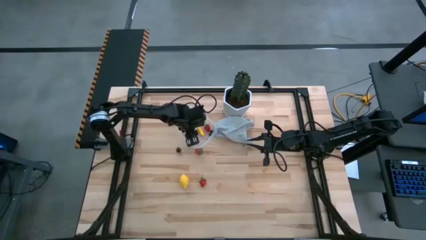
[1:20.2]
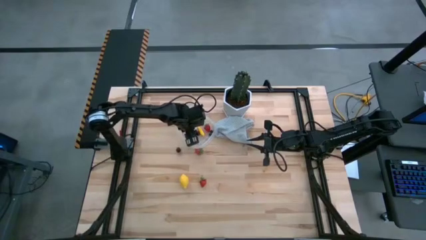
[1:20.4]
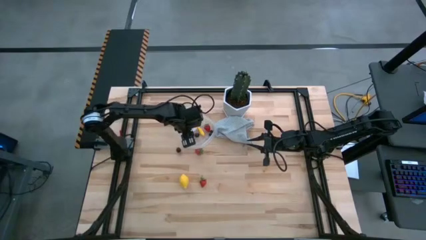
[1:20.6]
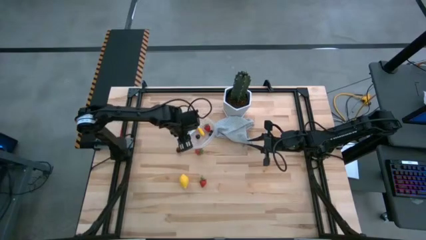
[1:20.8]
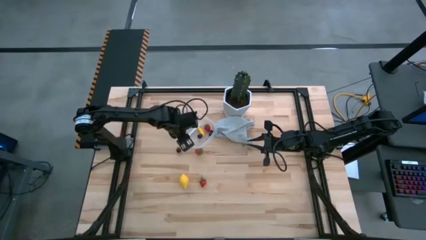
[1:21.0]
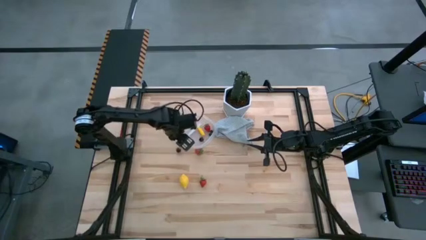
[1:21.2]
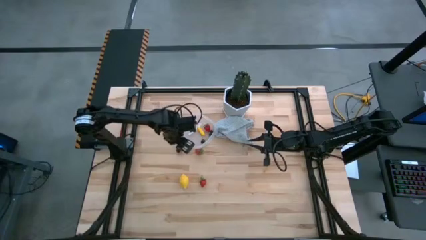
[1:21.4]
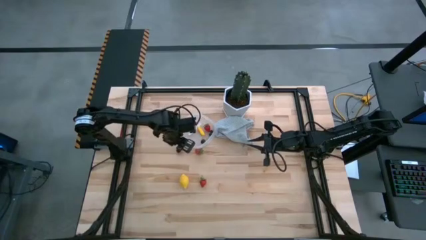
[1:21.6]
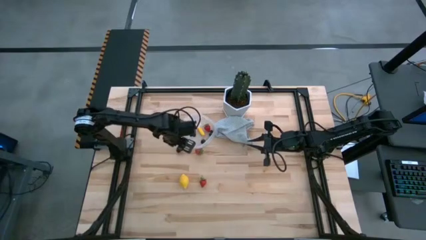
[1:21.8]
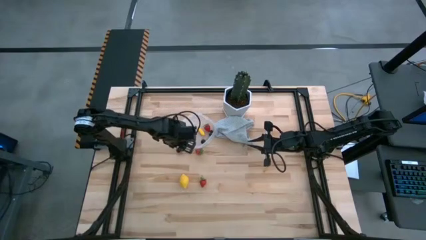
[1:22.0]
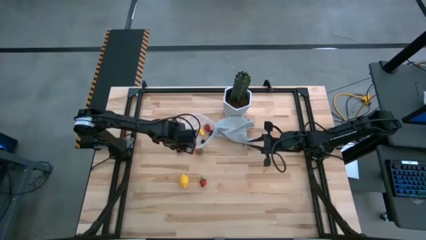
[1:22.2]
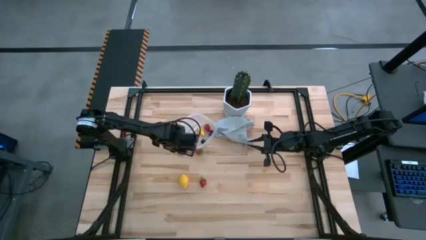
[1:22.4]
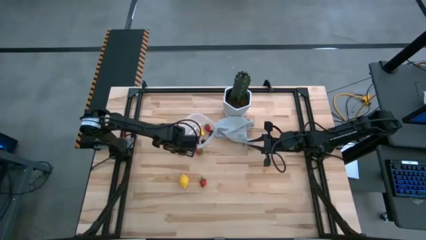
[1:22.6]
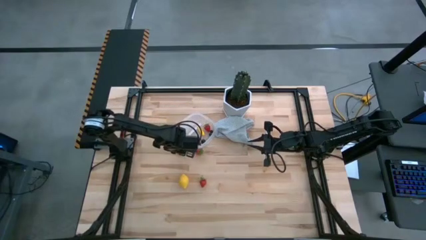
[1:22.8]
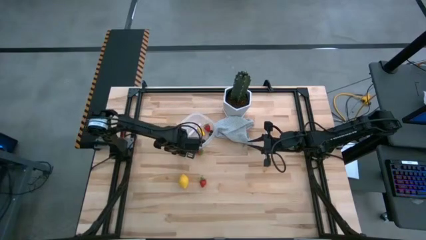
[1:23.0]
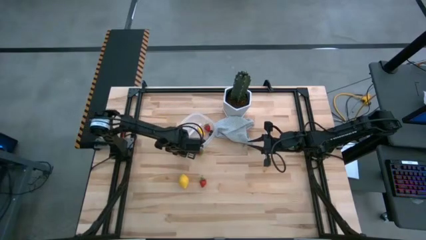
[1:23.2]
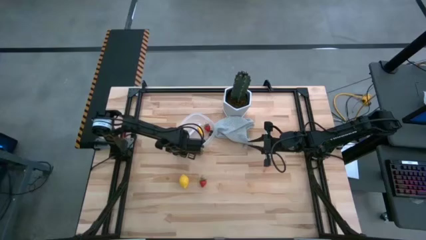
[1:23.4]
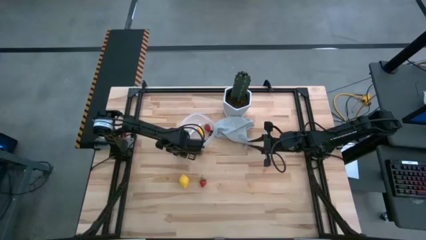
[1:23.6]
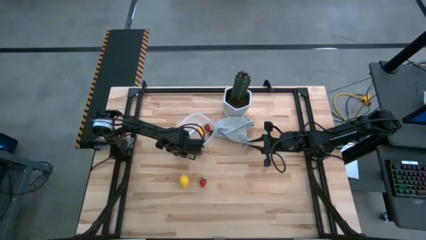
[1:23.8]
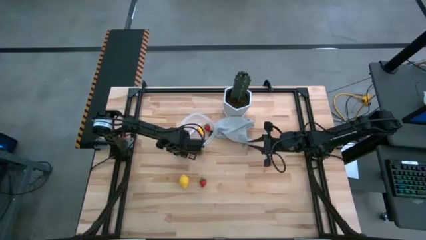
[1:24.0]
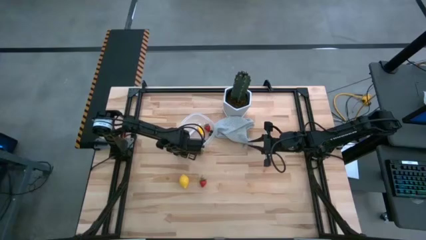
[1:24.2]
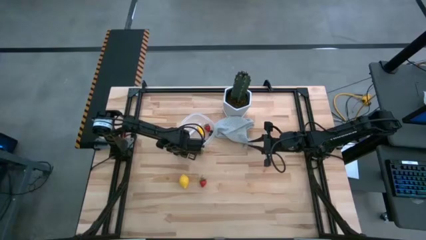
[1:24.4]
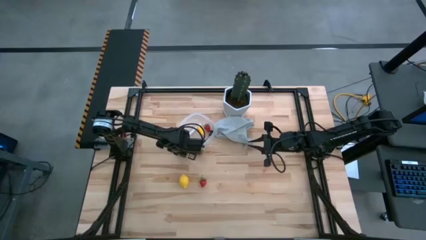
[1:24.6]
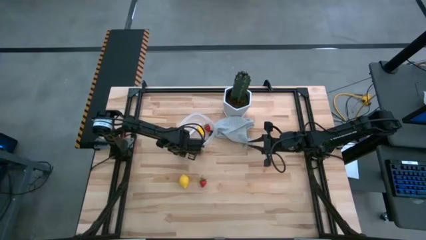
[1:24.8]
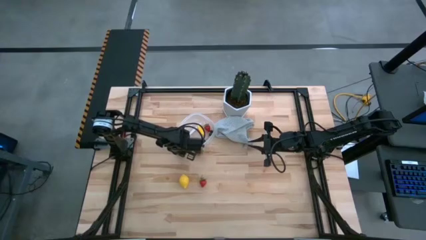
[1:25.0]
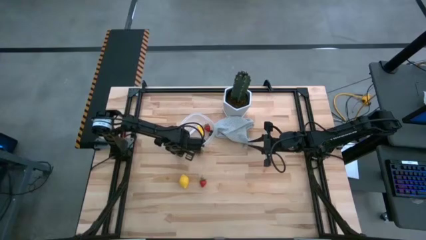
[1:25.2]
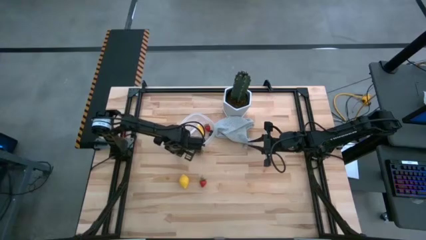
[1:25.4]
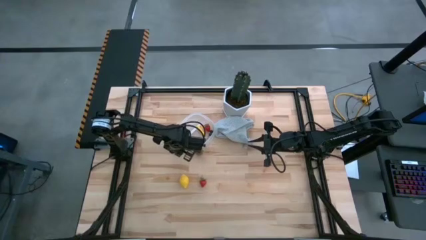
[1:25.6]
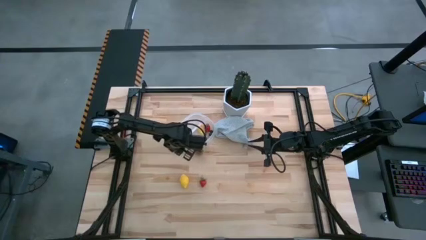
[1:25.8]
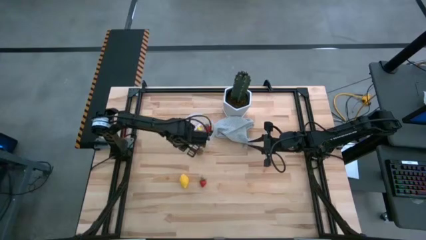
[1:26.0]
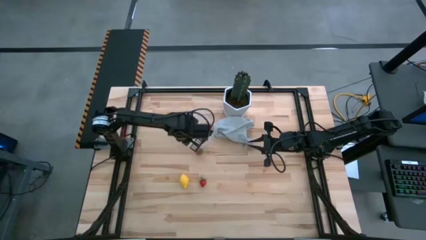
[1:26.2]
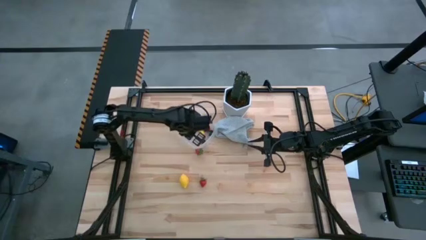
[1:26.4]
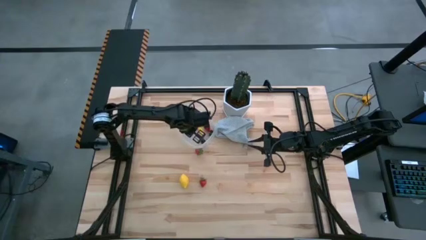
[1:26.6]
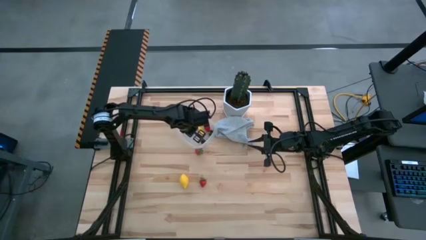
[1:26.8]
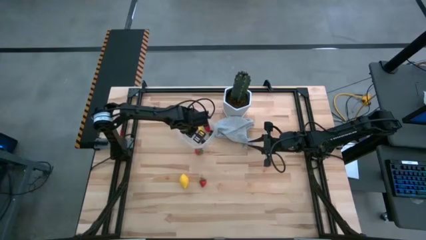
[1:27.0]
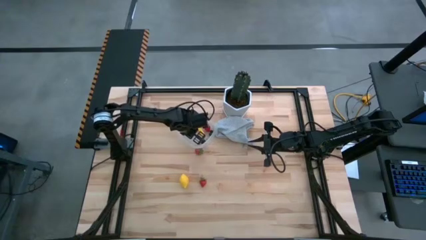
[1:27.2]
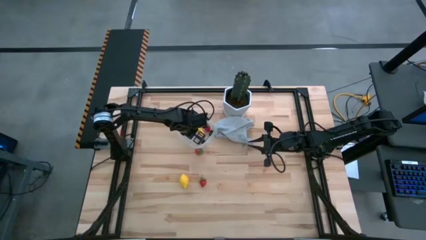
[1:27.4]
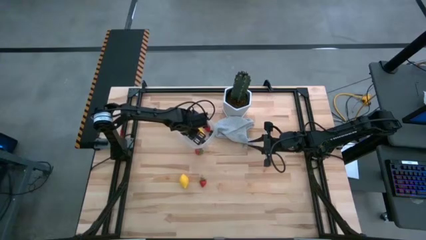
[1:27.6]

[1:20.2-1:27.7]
Task: Pick and placing Produce into tupperware
Put the blackberry into the transparent bin

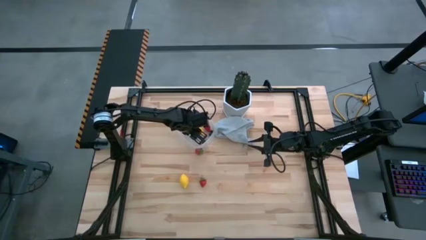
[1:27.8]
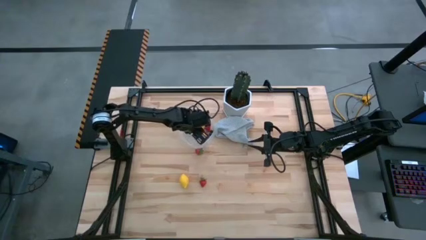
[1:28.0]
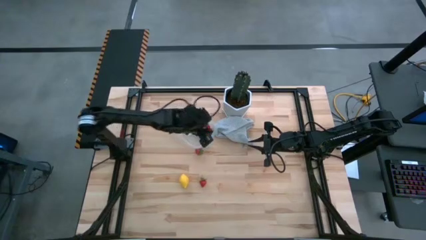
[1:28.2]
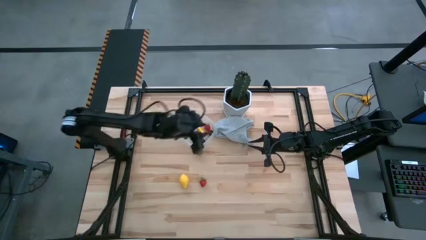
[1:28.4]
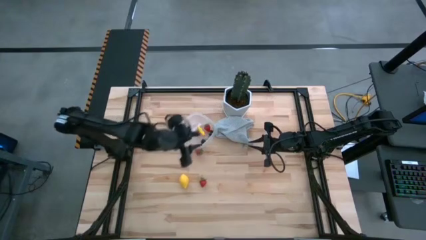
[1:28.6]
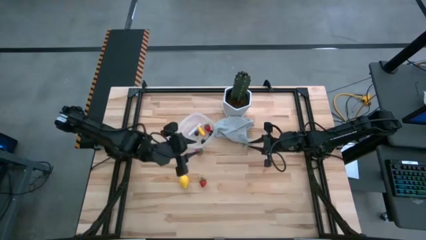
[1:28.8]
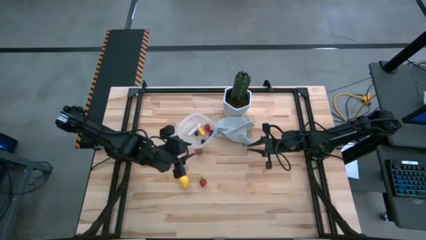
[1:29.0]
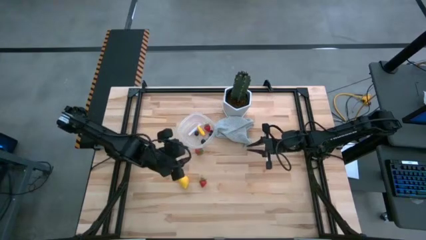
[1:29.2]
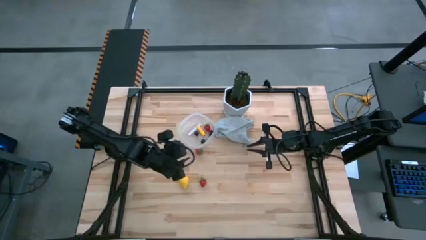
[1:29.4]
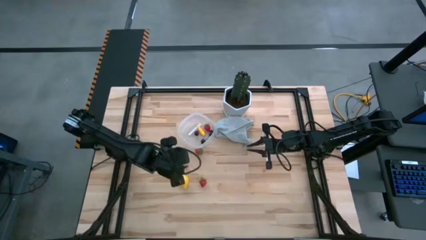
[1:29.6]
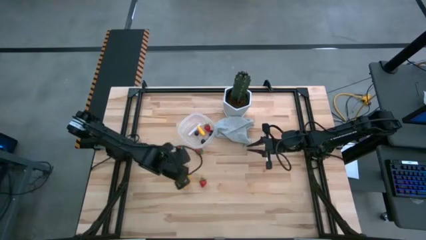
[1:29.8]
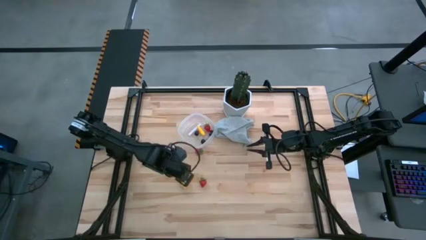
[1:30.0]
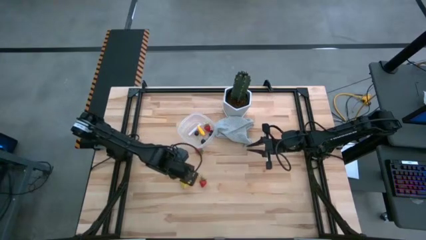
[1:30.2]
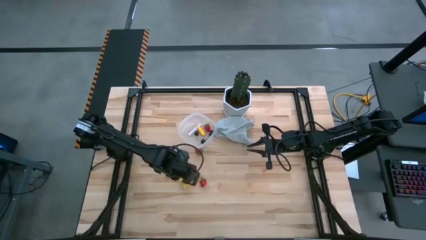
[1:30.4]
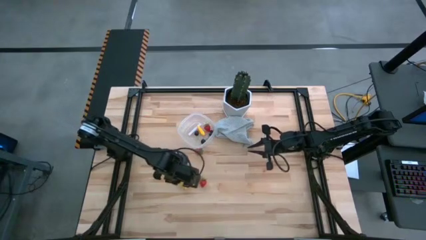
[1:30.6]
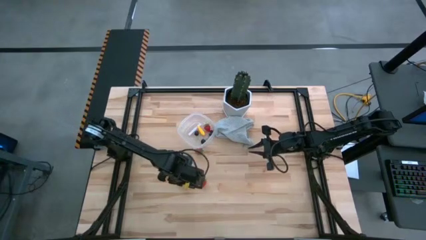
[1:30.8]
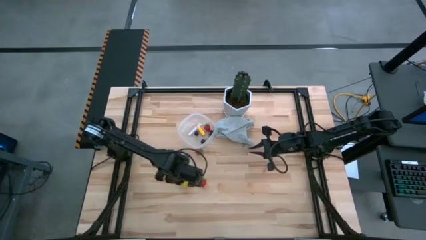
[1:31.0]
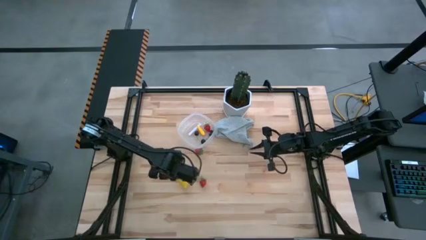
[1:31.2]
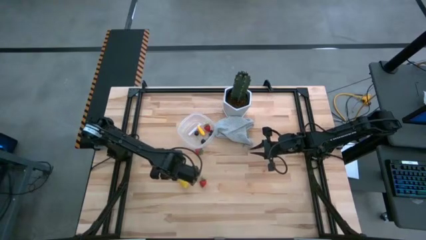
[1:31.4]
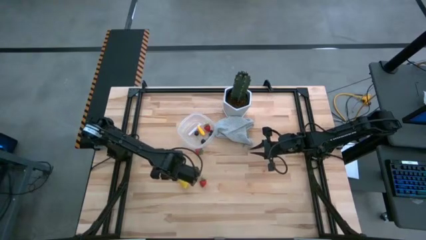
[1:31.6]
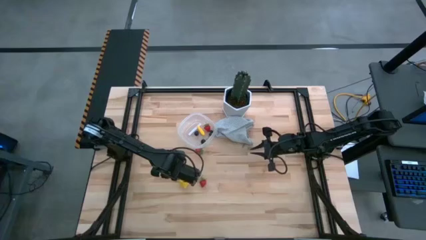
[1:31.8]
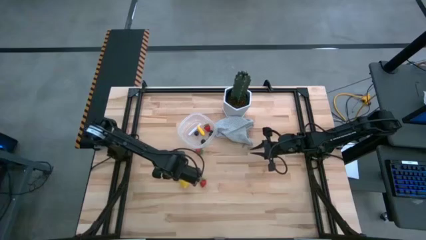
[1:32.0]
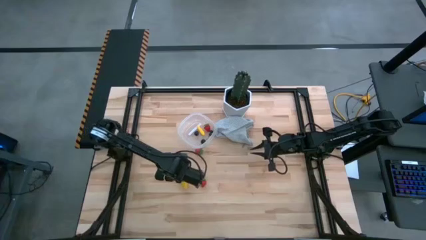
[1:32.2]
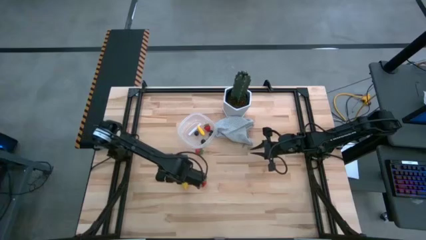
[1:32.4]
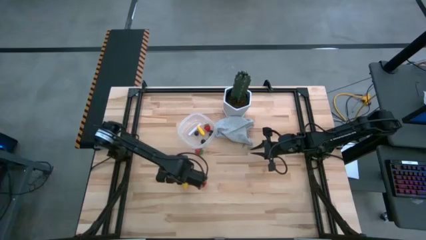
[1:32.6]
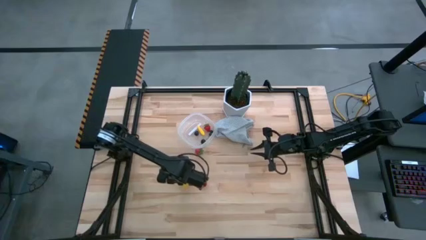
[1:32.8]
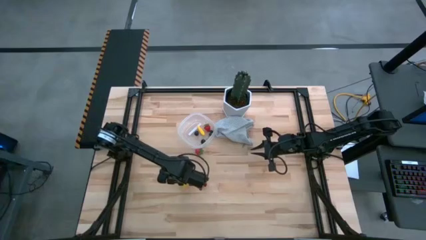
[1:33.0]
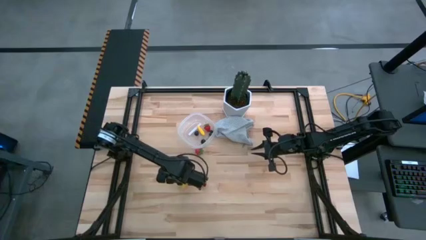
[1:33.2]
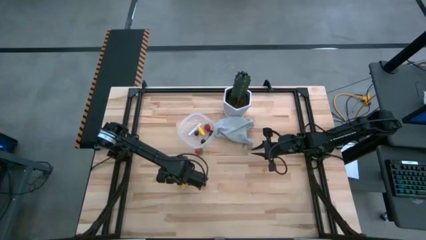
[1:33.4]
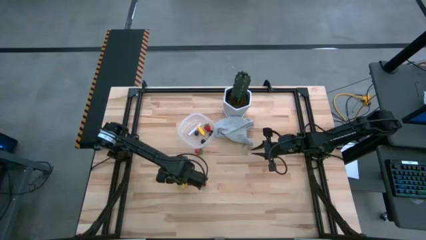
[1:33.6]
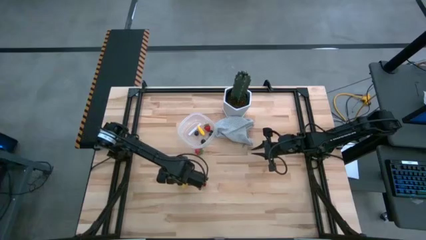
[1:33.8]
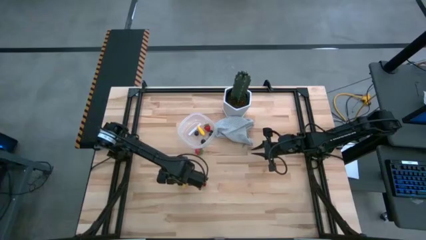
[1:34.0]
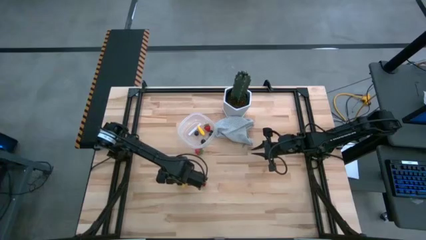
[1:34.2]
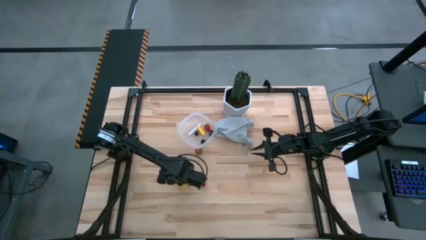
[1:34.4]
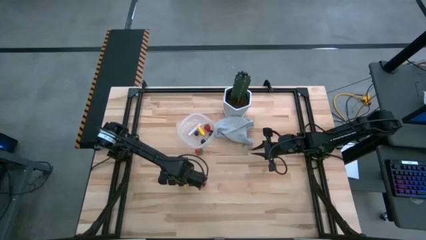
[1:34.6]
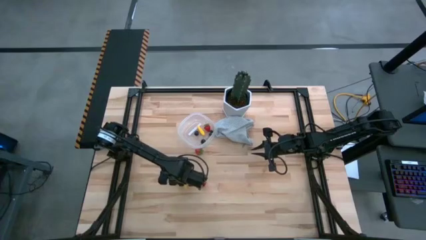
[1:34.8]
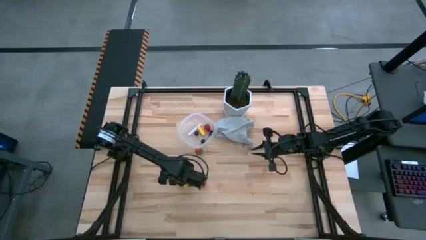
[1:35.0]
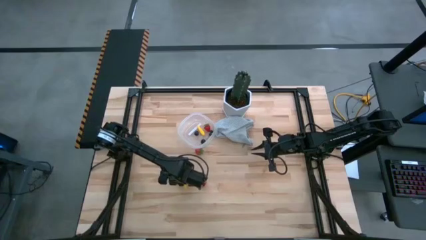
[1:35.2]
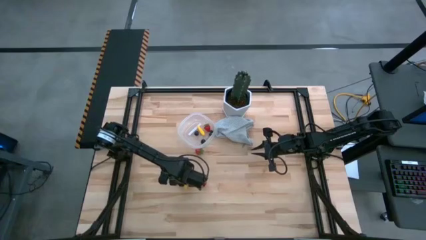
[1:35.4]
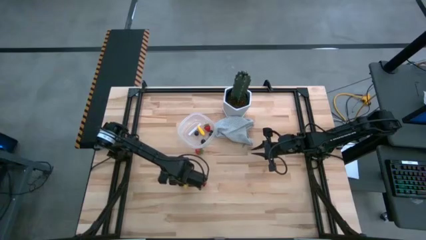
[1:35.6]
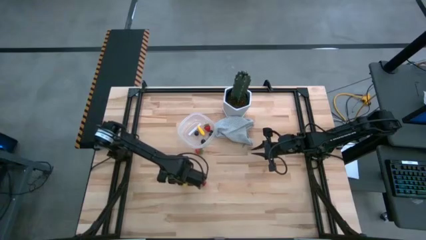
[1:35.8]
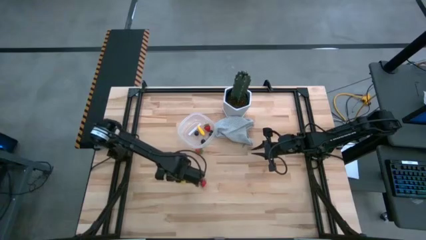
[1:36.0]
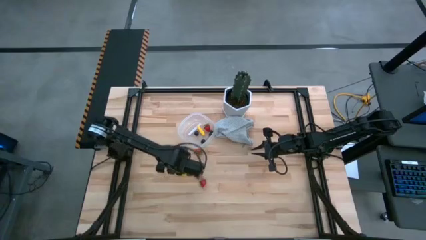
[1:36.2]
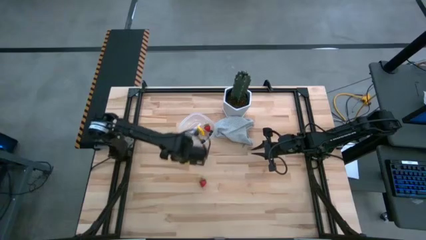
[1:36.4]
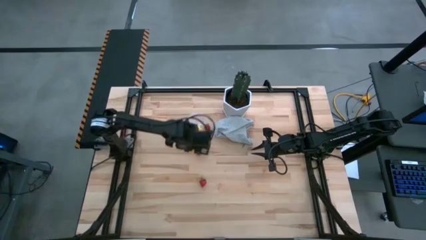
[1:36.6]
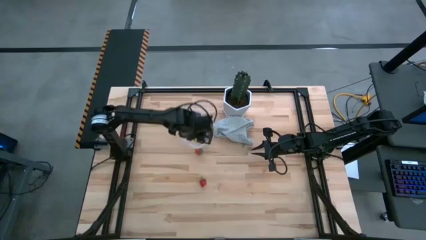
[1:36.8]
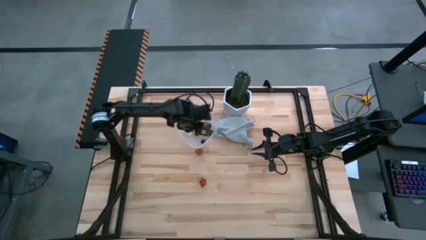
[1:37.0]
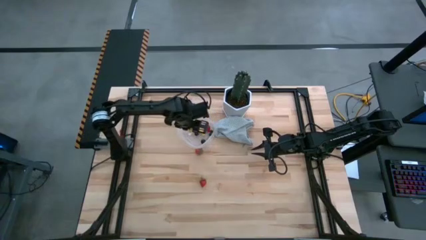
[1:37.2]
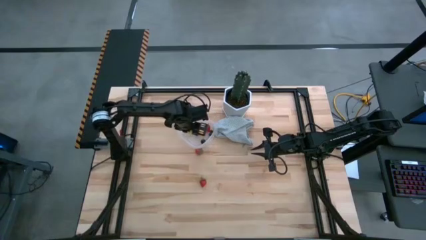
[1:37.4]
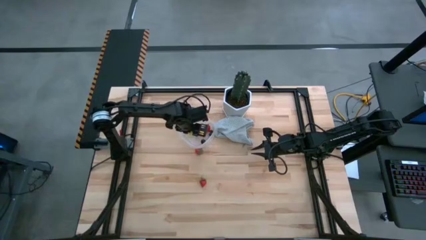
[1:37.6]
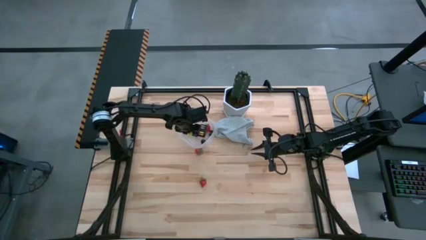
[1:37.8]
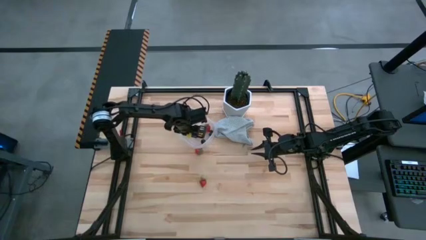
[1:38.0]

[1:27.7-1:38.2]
Put the lemon into the transparent bin
